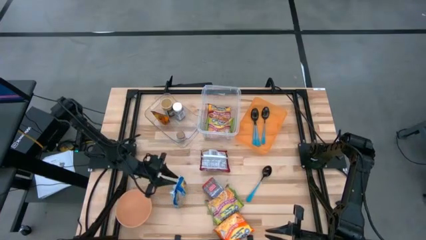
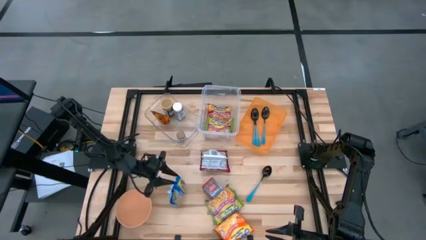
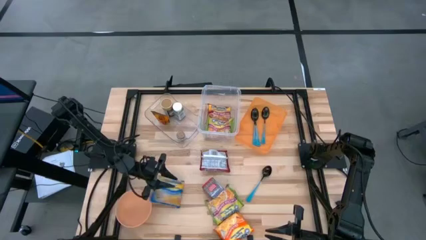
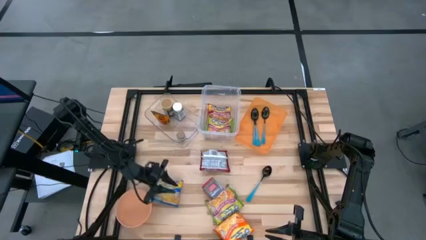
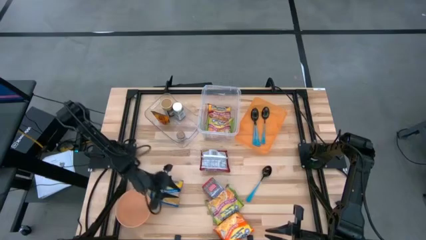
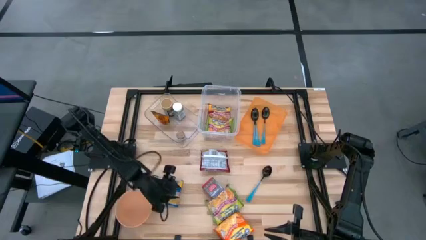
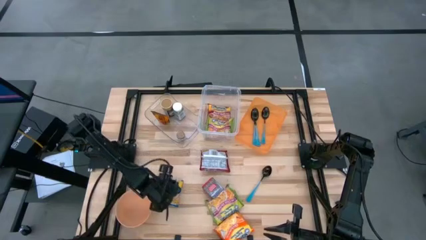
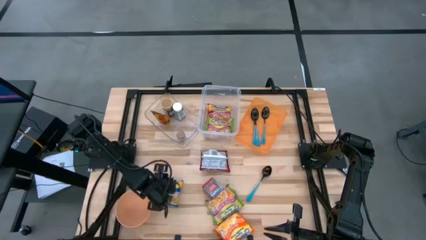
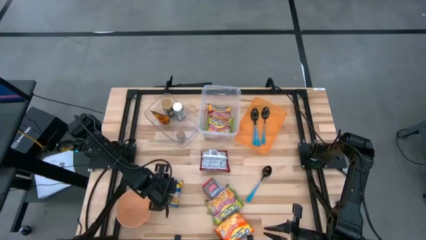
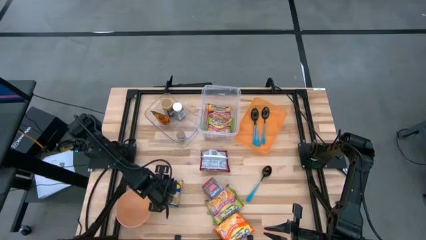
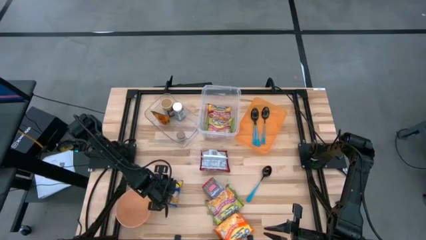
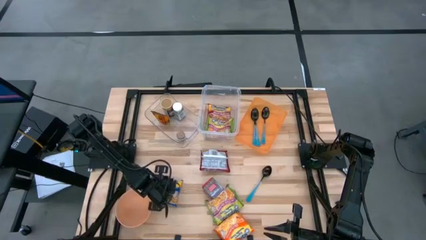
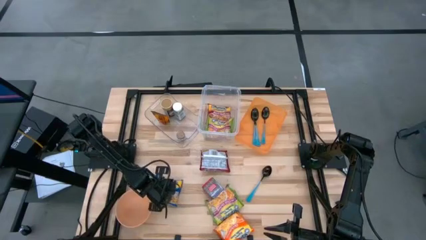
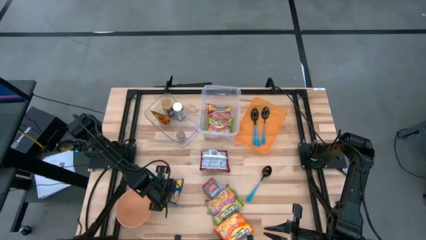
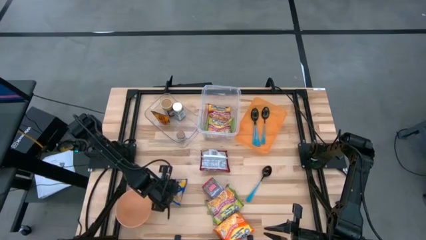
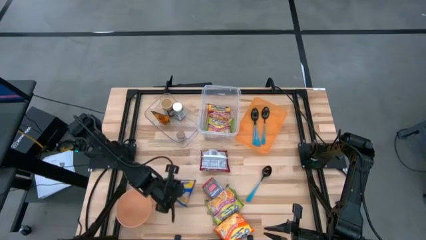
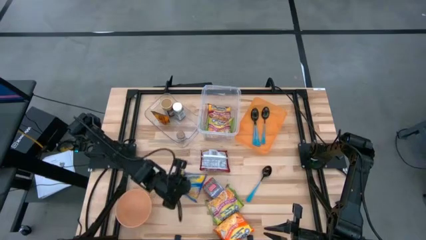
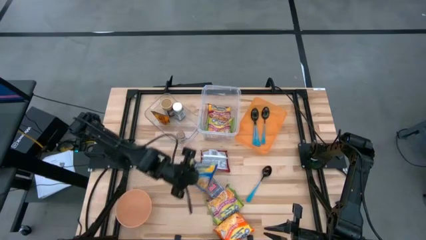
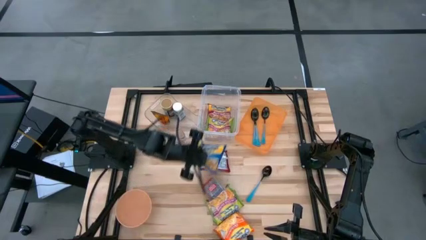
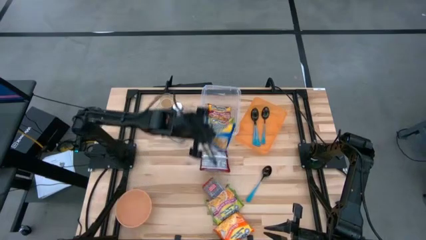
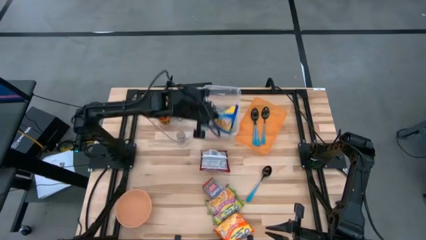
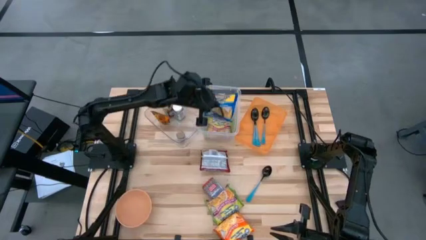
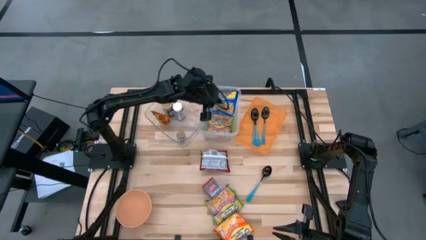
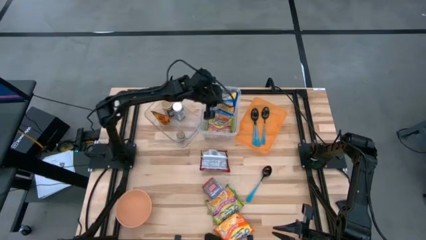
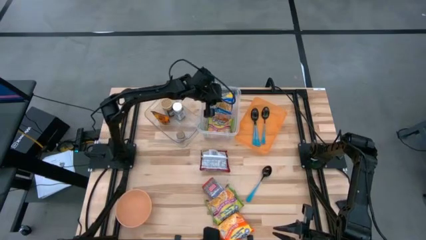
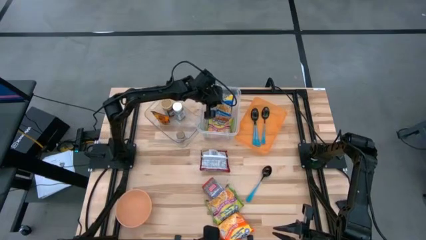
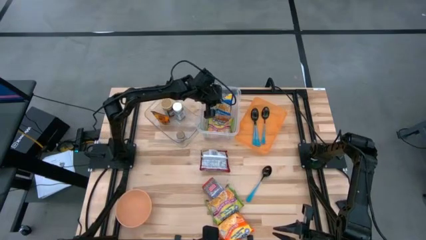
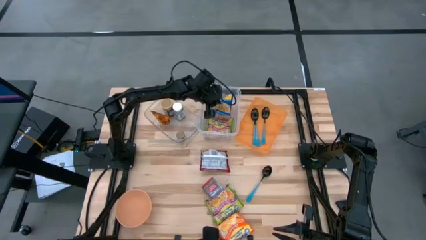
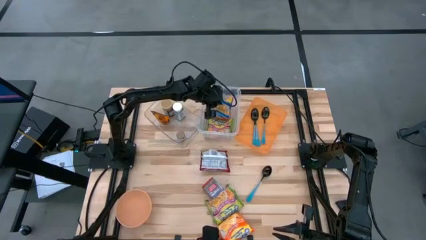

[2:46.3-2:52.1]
Task: Pick & Place Food Item
Put the blue noodle pack into the white bin

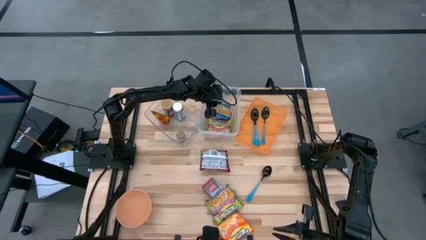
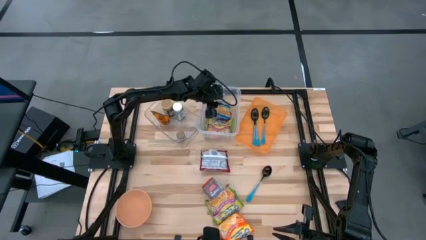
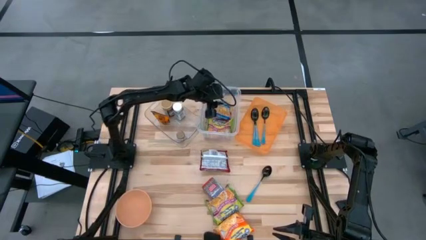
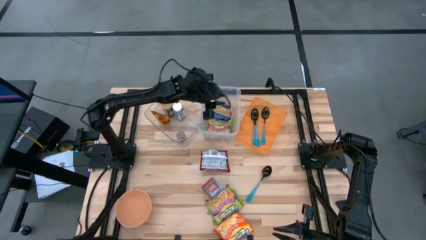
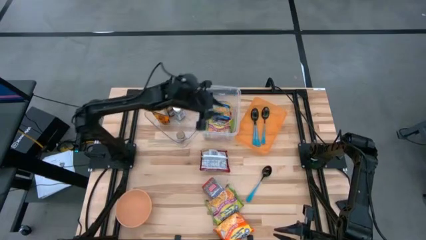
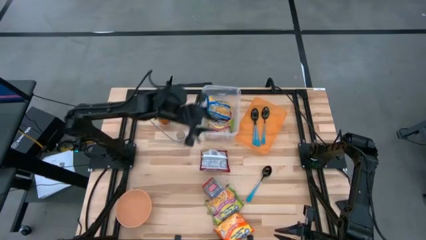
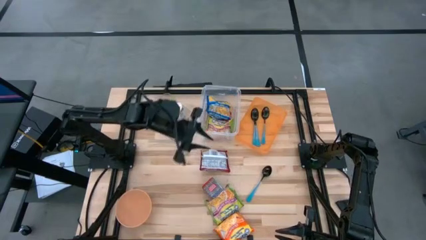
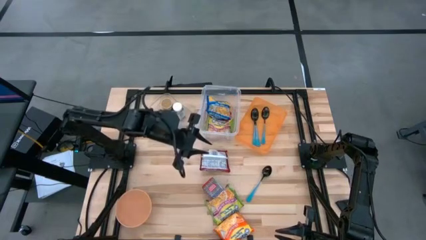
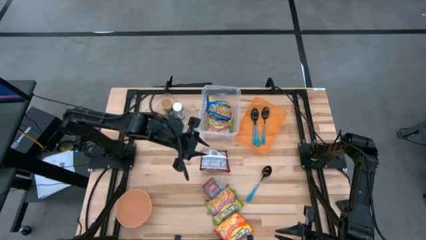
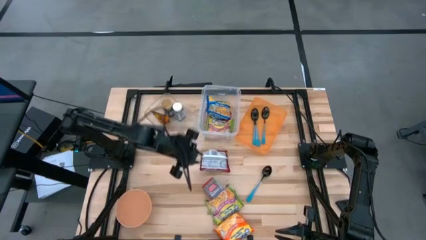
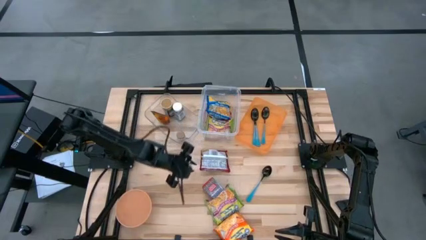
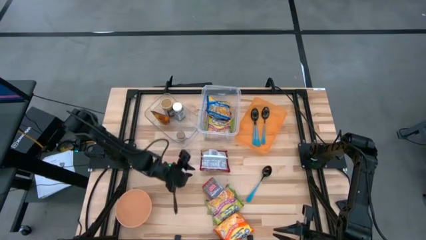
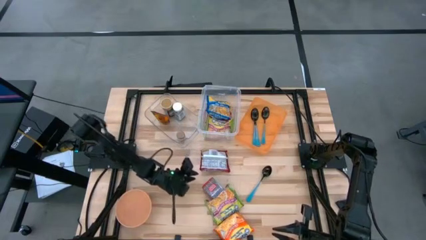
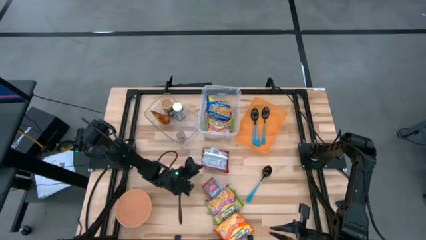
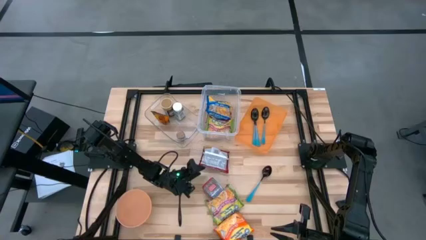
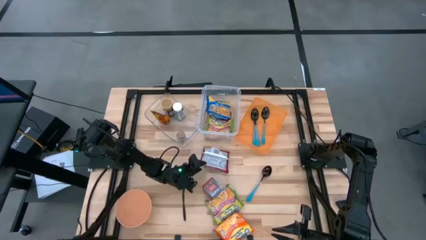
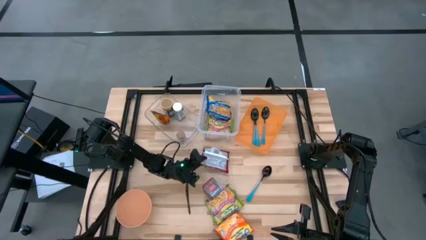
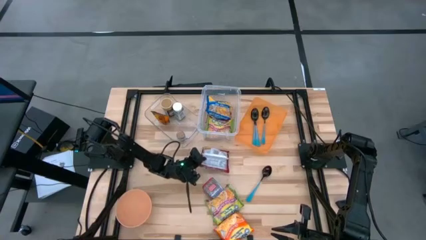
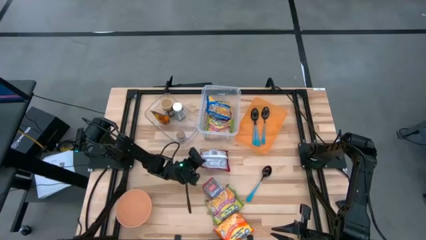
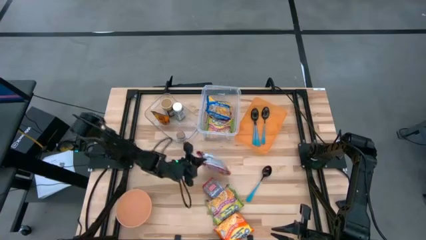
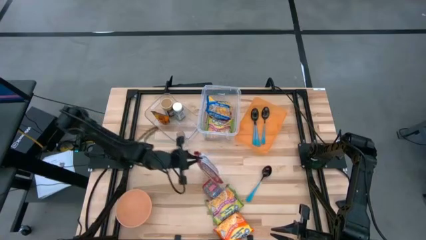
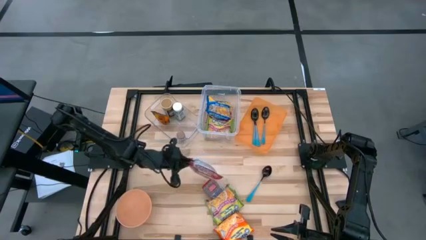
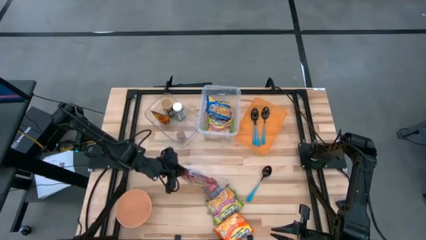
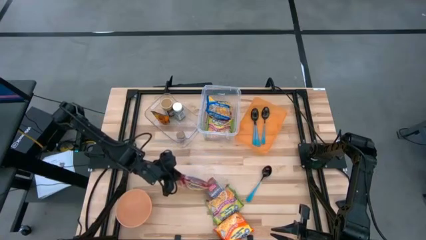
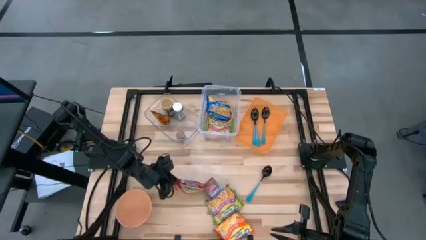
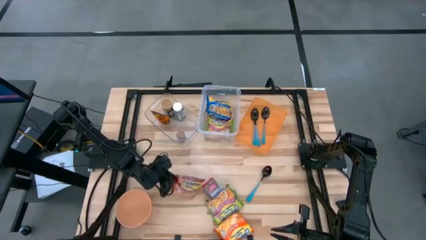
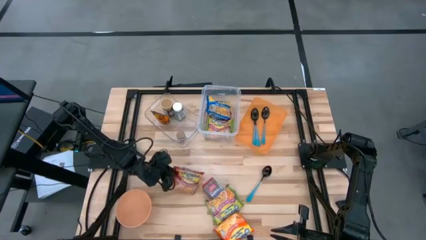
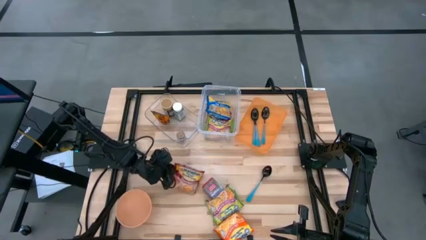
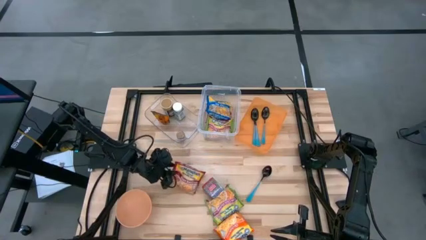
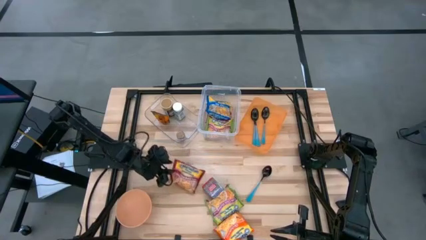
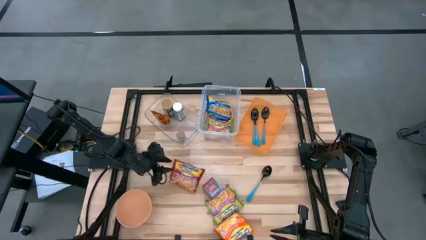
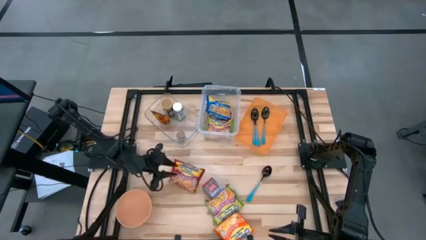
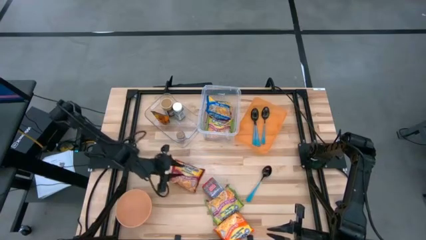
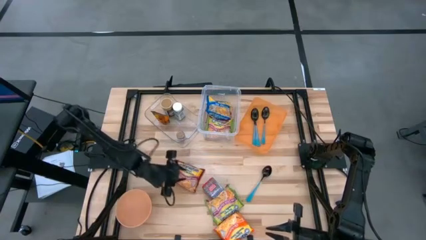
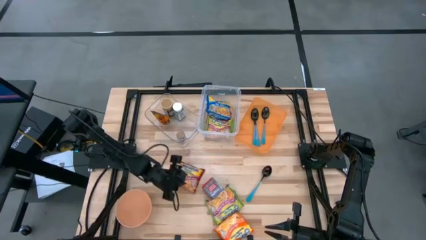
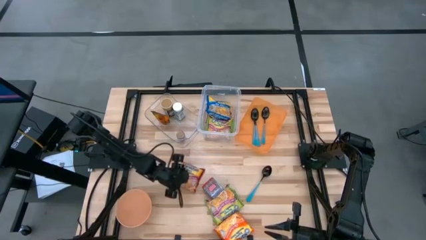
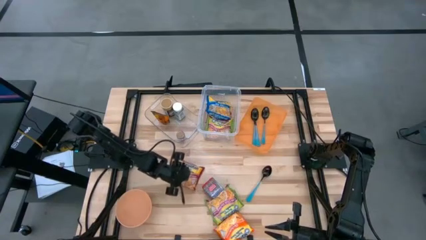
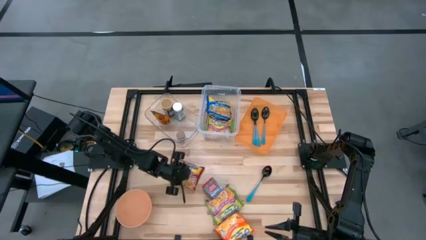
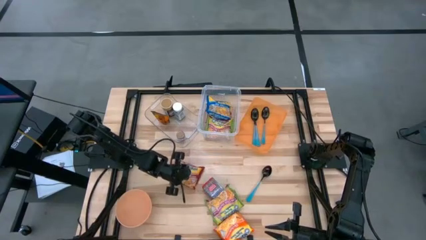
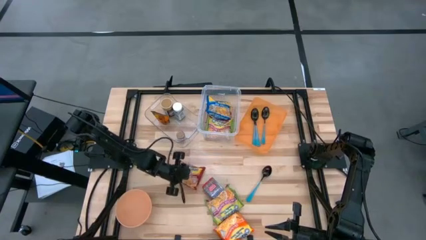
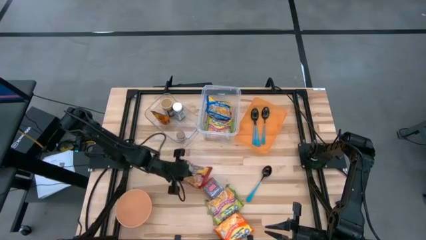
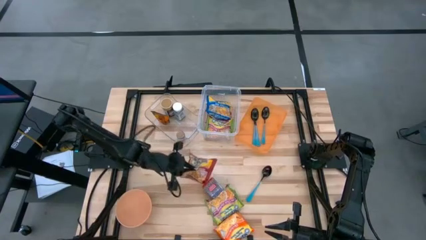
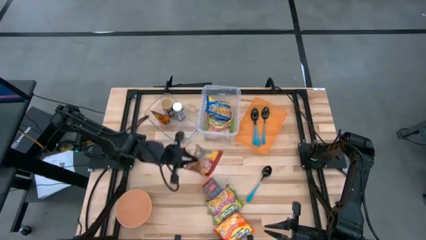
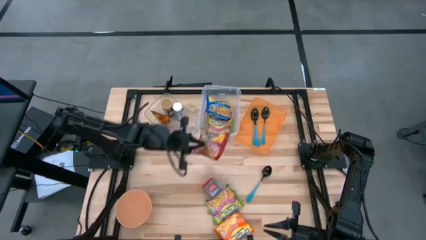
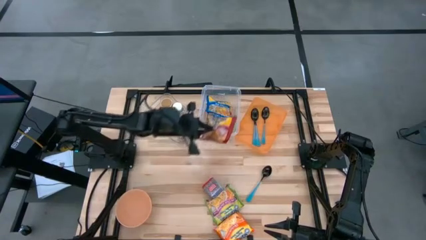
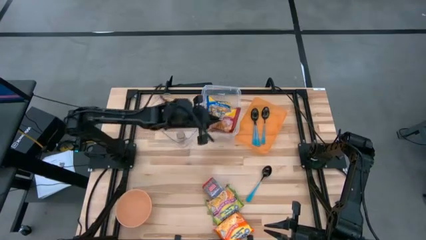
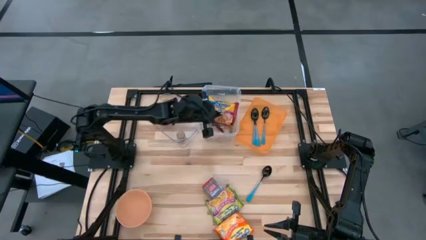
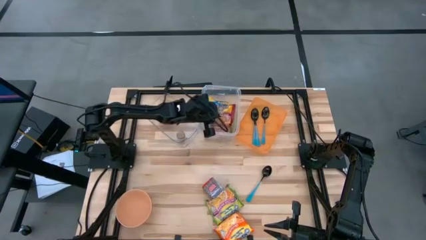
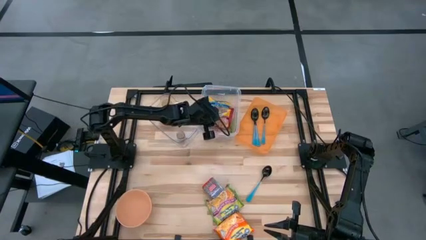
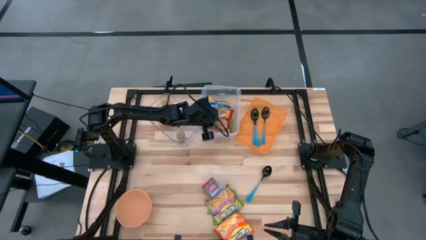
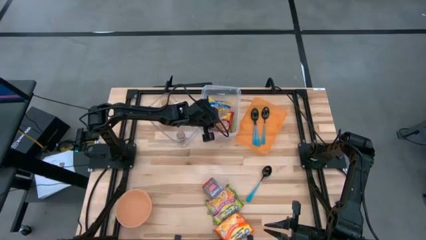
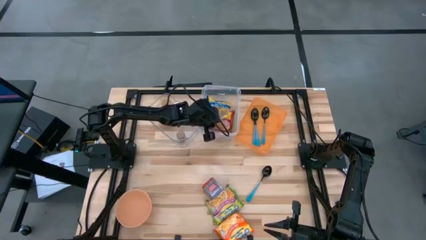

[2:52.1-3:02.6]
Put the red noodle pack into the white bin
